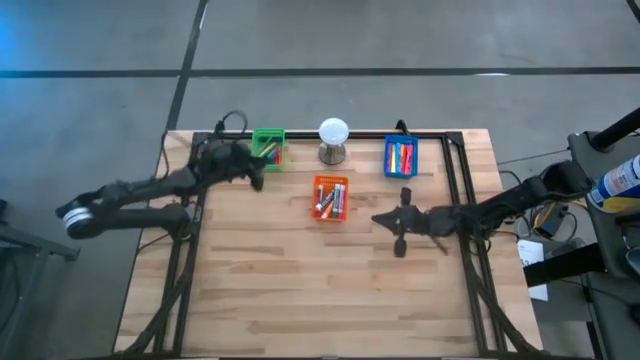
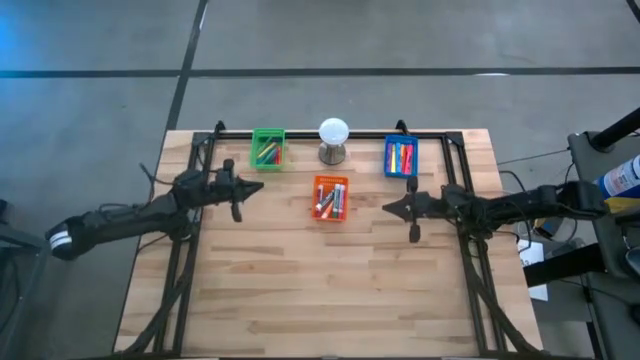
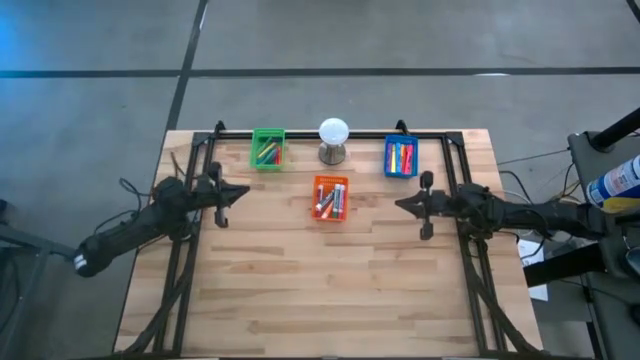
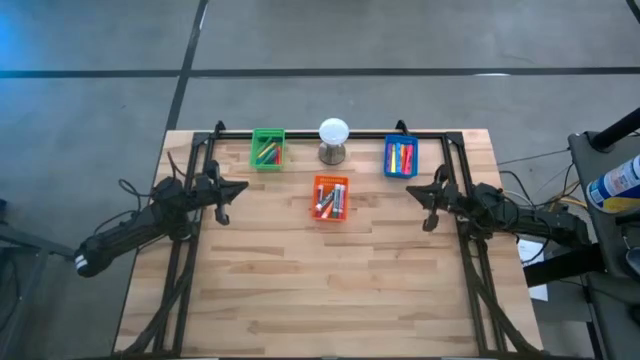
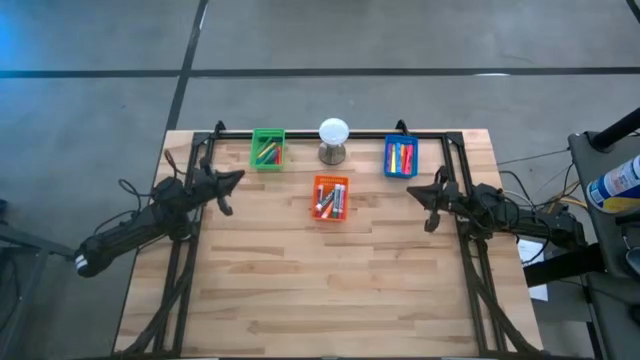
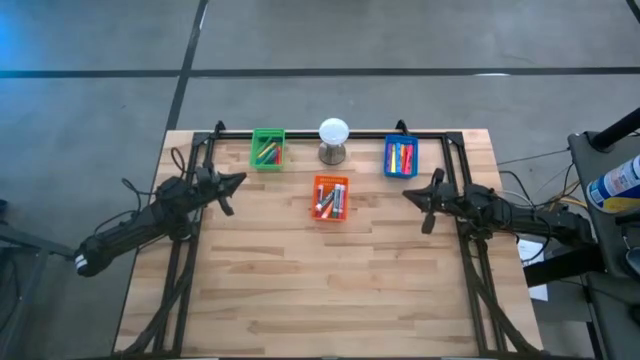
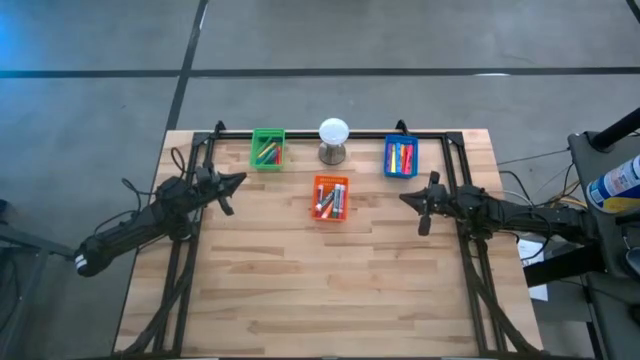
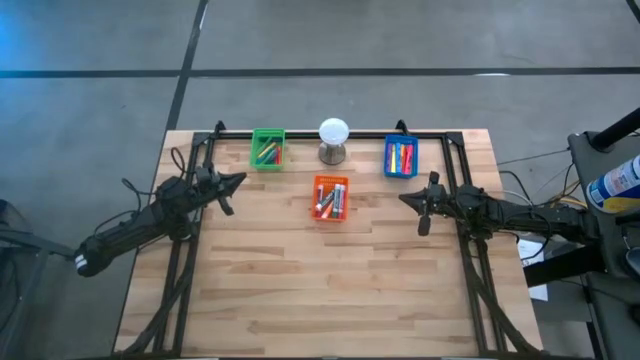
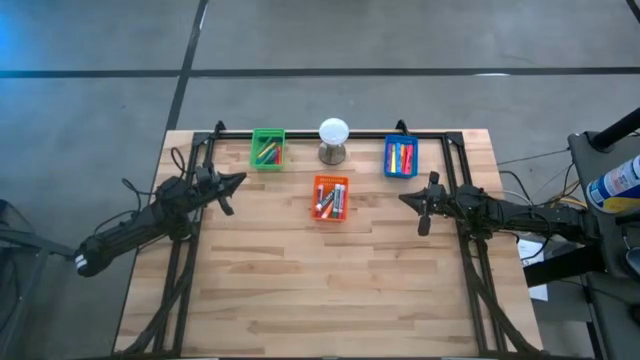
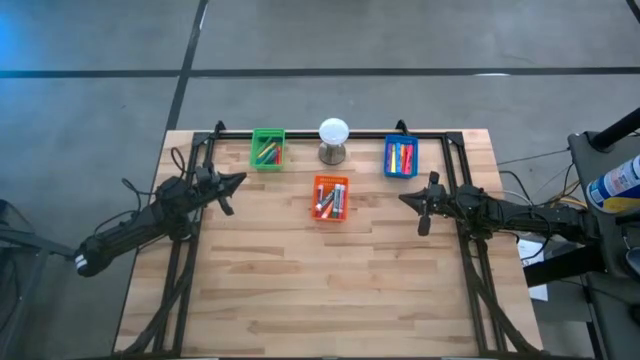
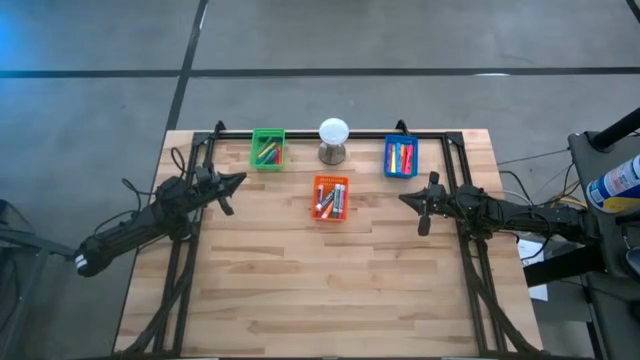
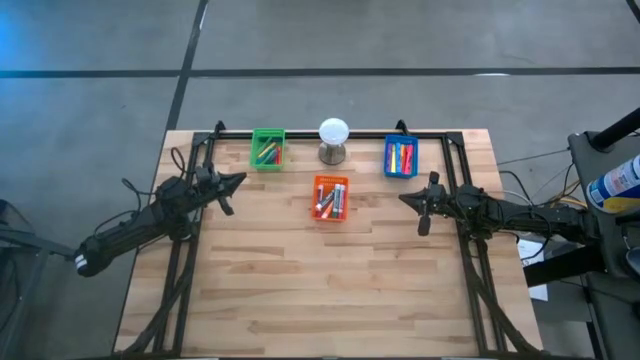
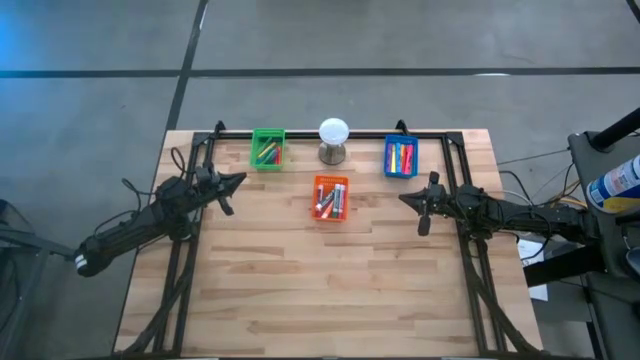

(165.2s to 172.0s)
Task: Pick & Place Markers
Return to Home Position
